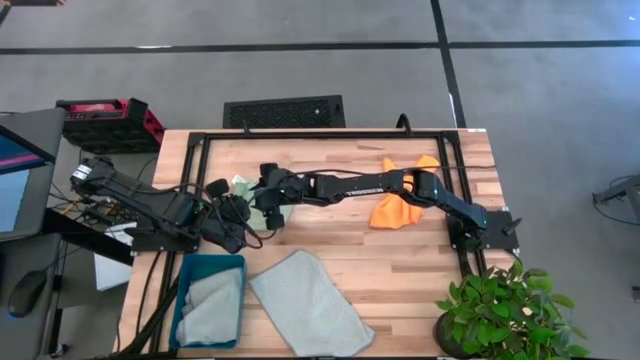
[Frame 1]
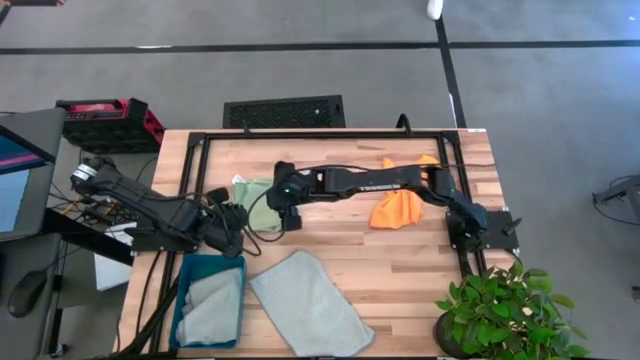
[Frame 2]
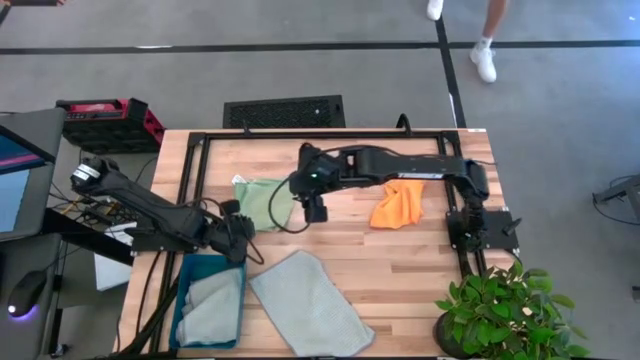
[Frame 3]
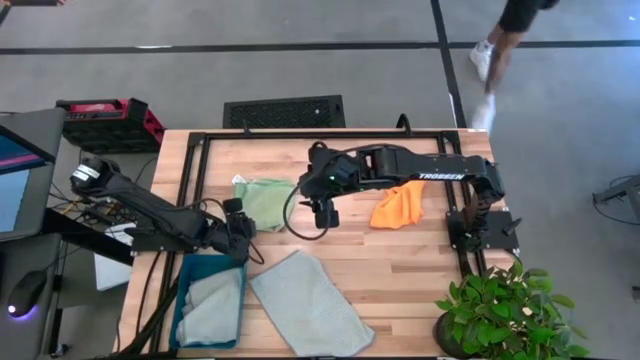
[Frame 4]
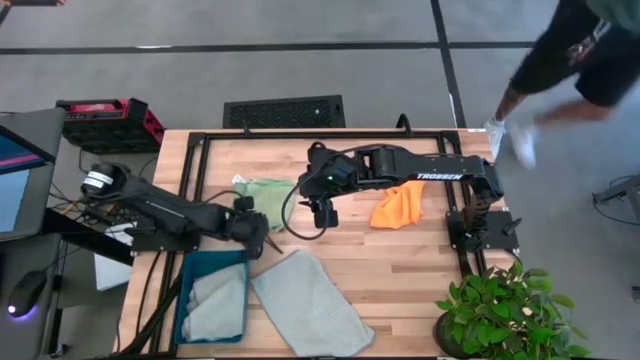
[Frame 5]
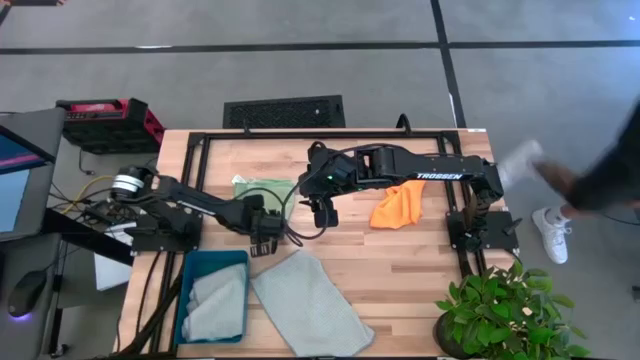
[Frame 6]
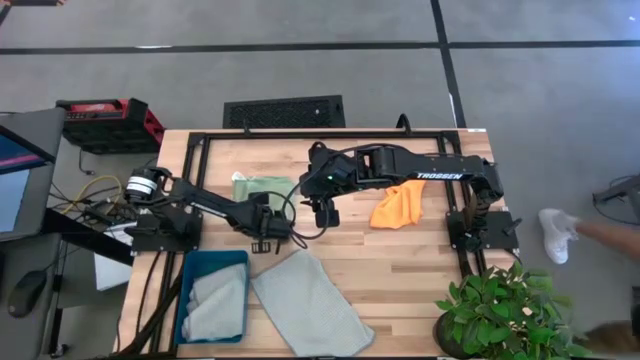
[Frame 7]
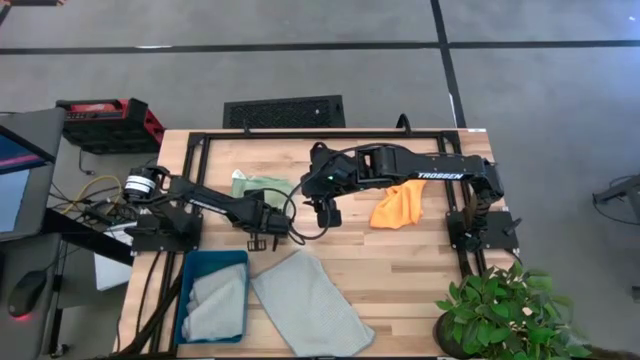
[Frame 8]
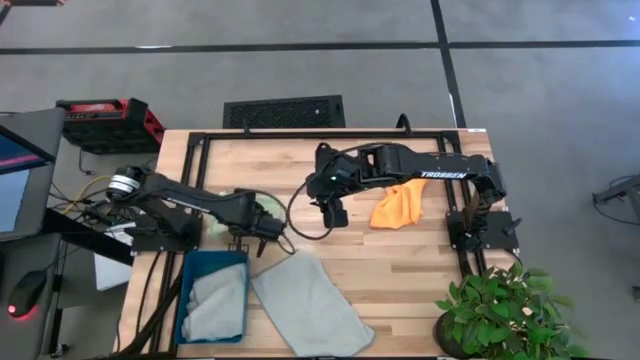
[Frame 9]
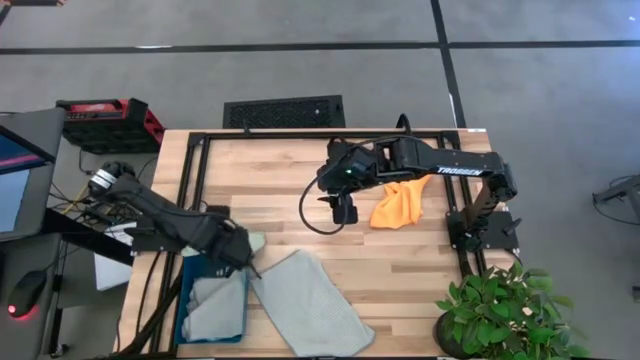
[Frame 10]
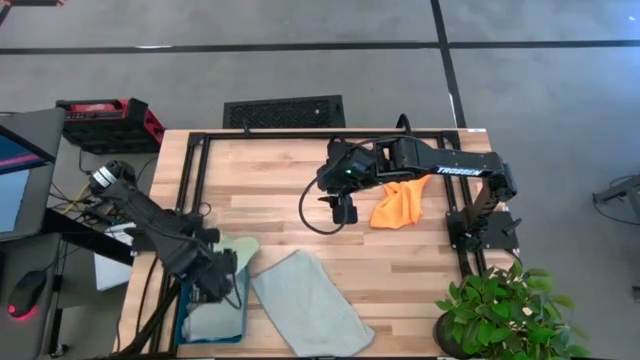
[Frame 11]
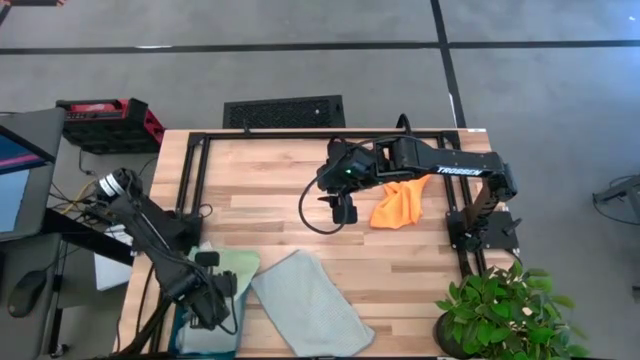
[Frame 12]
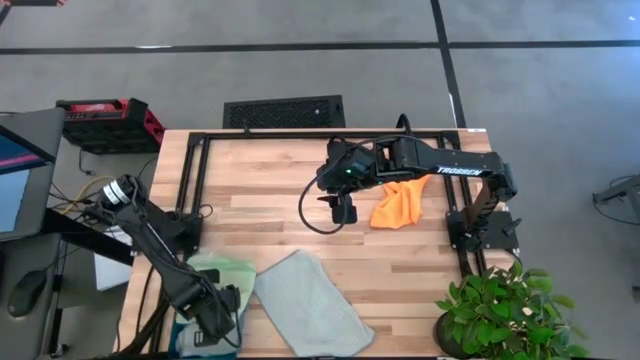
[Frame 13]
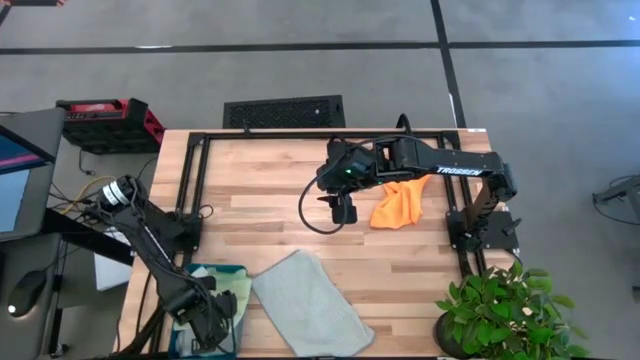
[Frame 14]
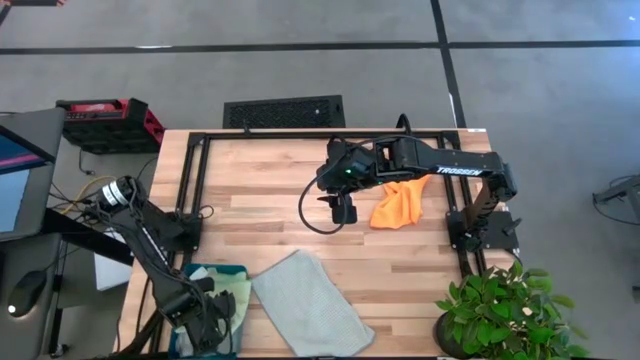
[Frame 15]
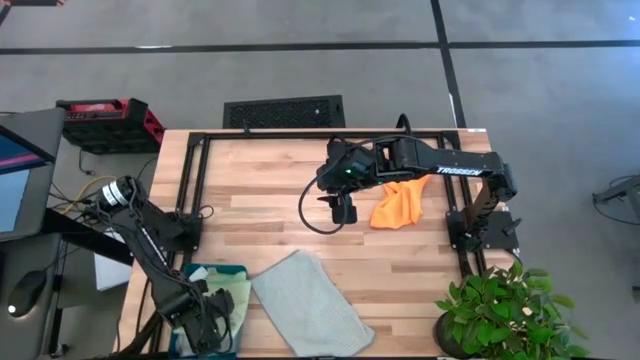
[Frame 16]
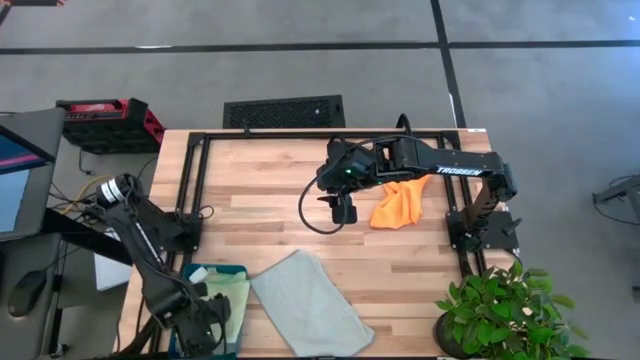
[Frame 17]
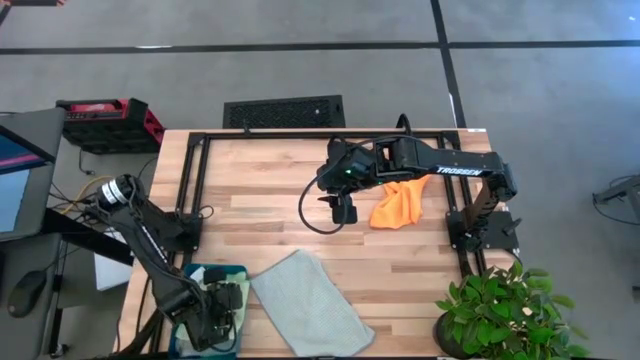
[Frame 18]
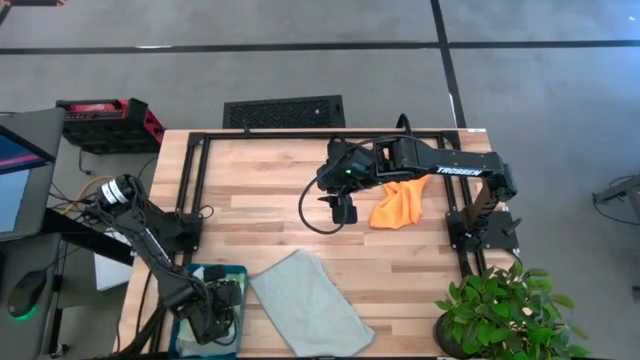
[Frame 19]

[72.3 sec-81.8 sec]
Task: Fold microfiber towels
Put the folded green microfiber towel into the blue bin

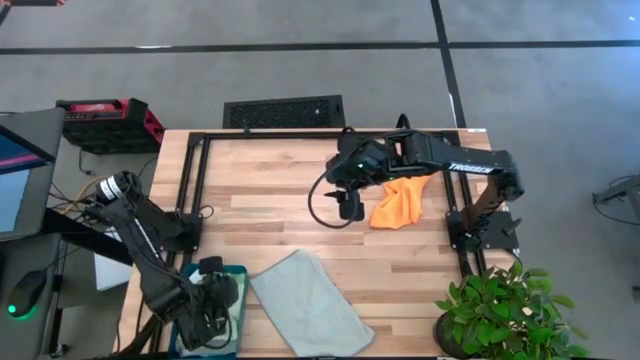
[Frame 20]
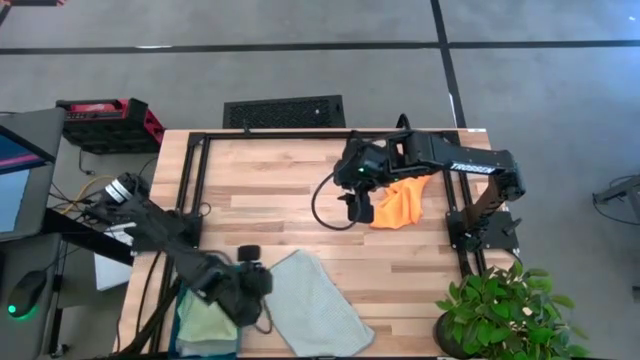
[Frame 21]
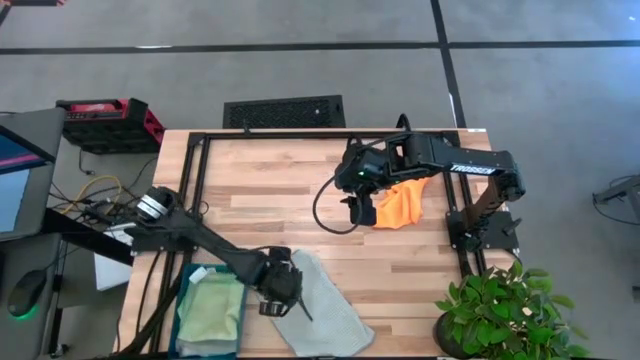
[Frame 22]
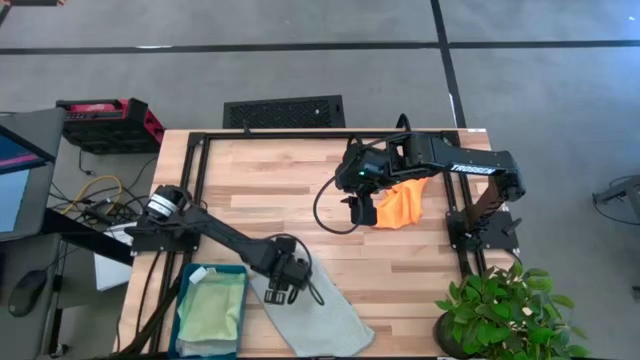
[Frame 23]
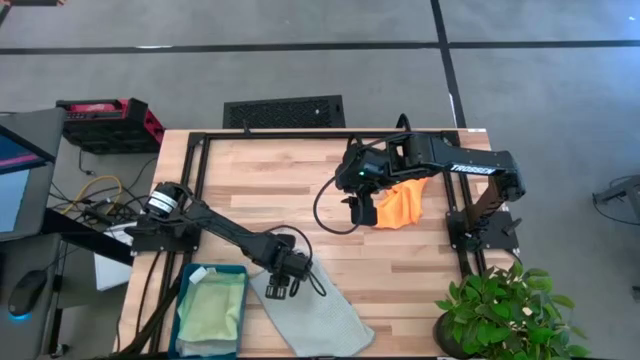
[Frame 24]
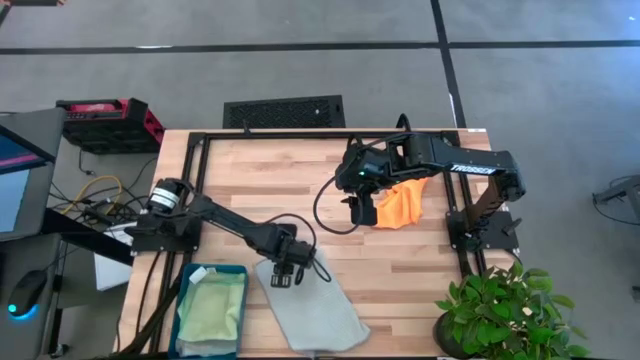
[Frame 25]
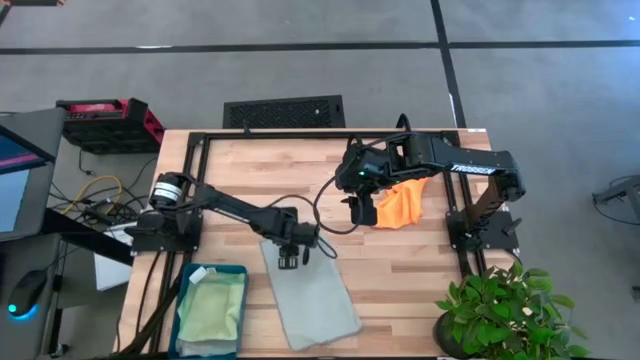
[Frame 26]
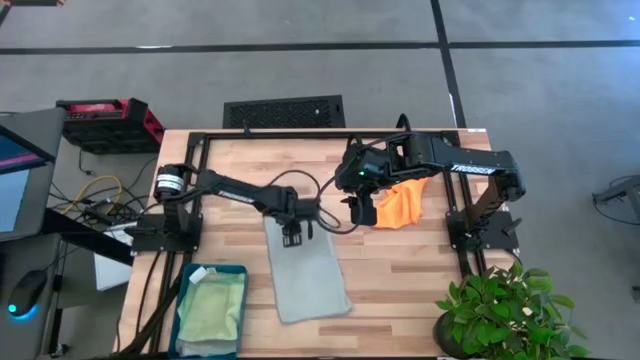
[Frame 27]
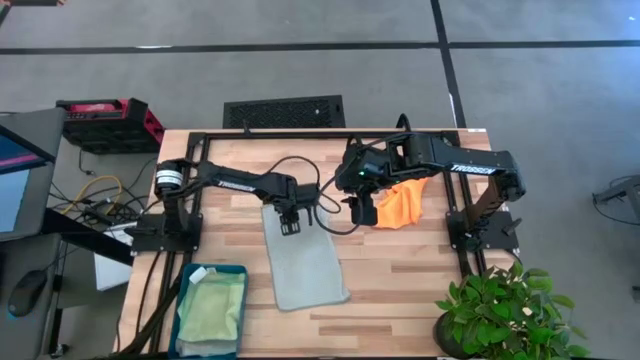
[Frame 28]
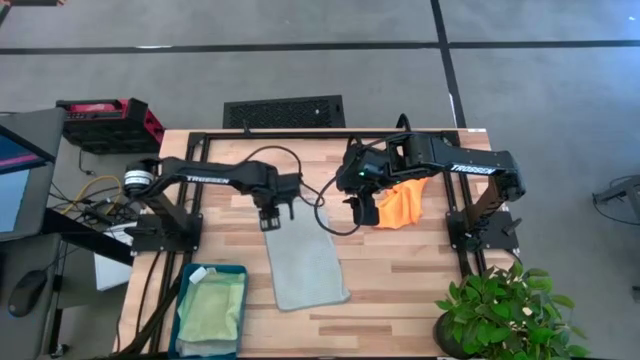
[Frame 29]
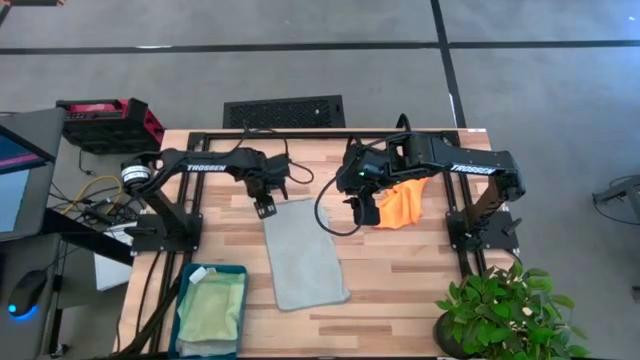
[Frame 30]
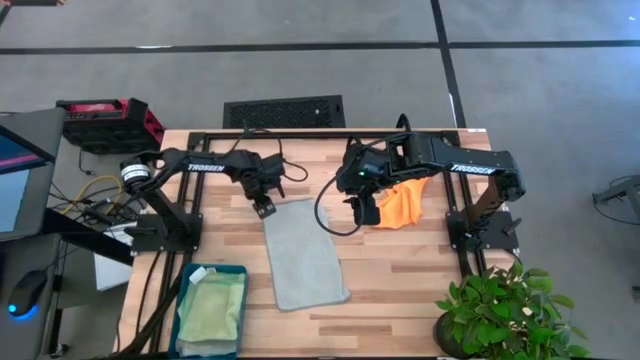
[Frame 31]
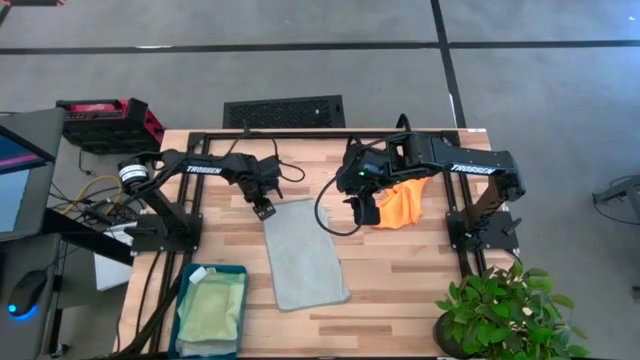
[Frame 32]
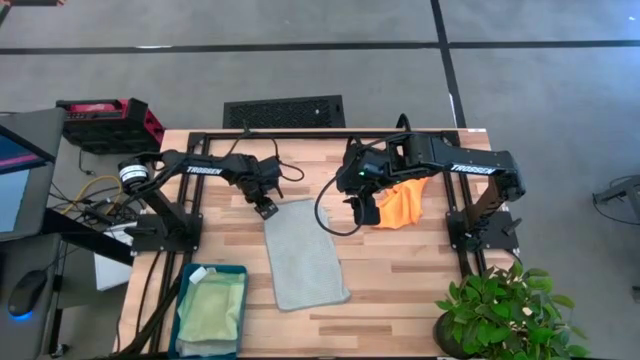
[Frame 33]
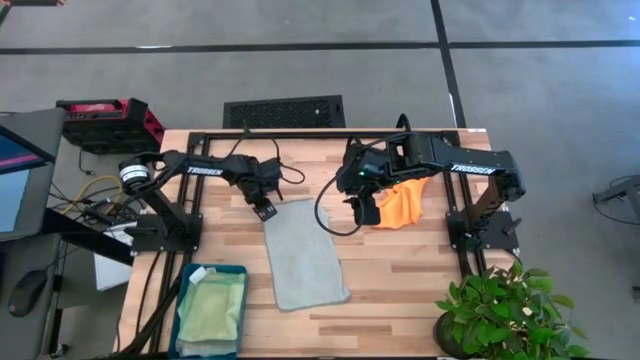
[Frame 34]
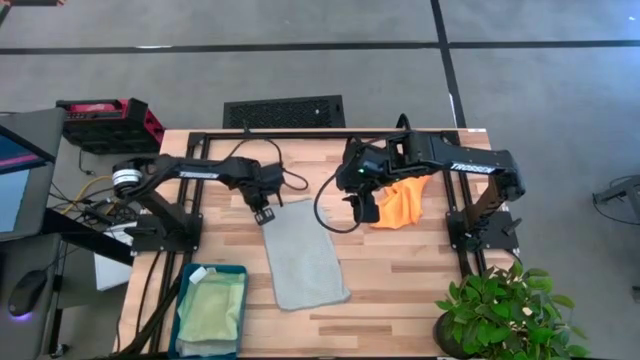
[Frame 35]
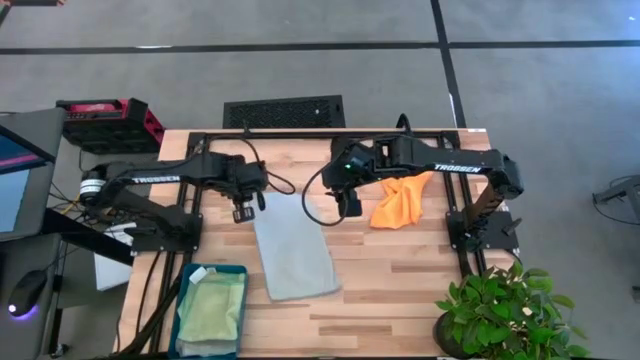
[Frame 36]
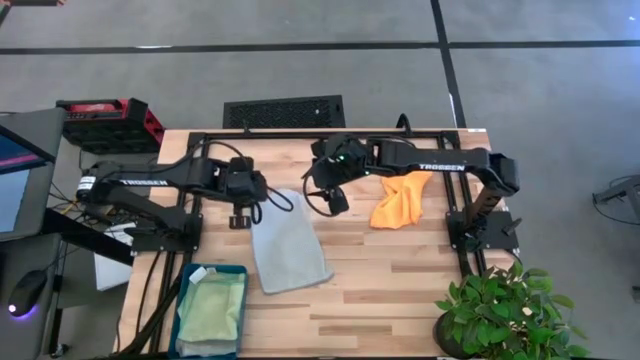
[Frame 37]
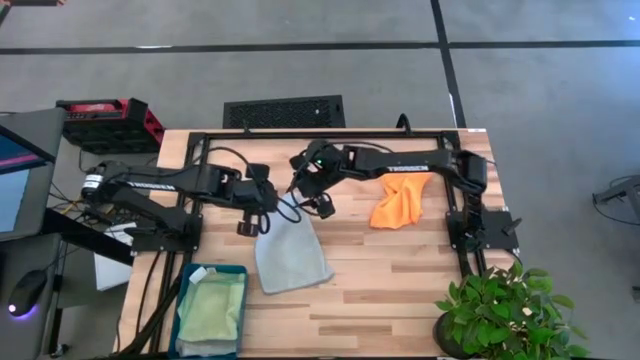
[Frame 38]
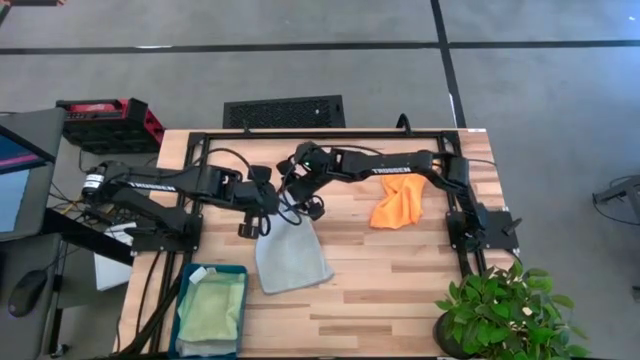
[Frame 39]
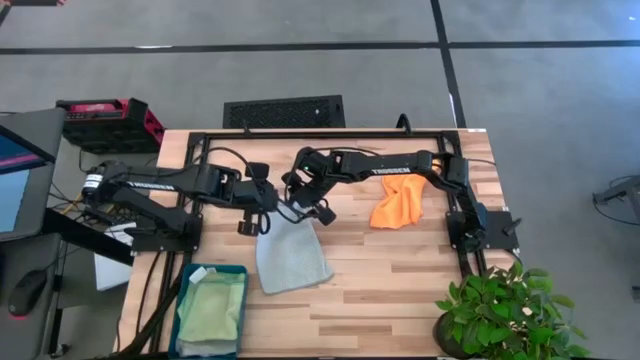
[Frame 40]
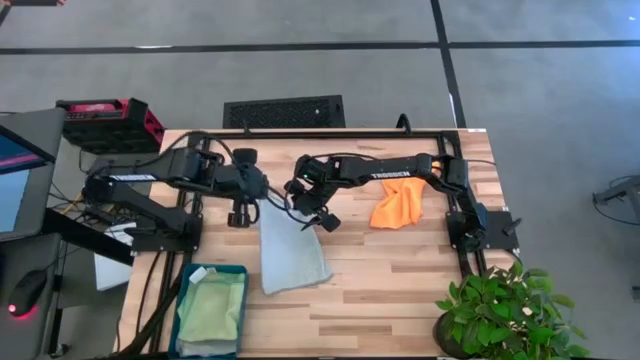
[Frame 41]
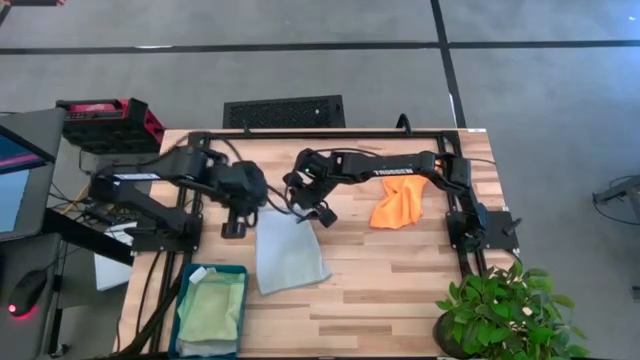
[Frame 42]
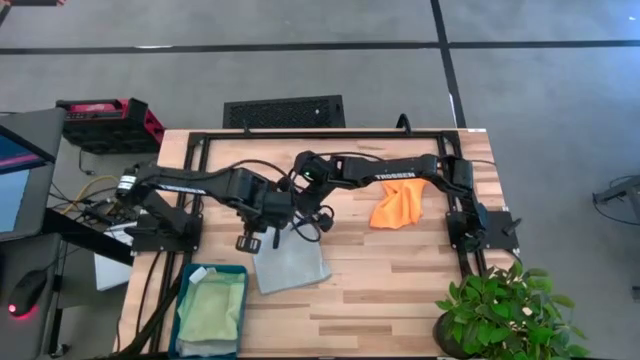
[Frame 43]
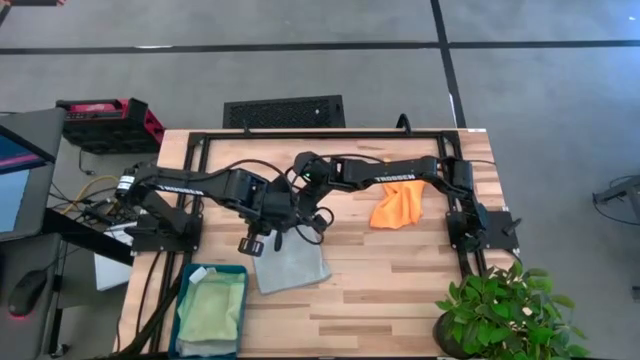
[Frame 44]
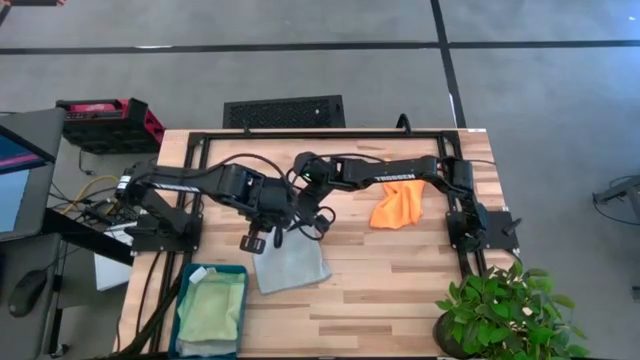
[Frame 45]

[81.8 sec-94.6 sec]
Fold the gray microfiber towel
